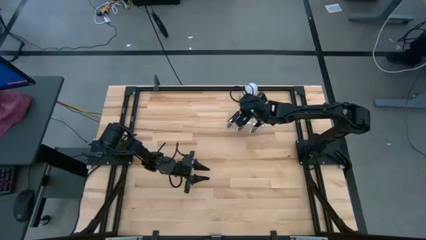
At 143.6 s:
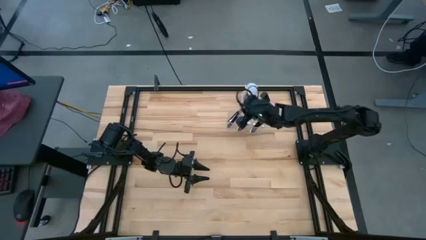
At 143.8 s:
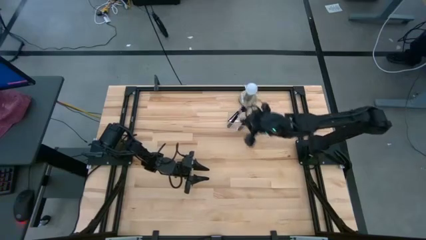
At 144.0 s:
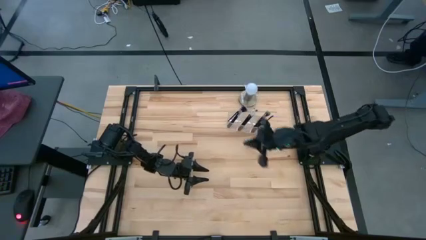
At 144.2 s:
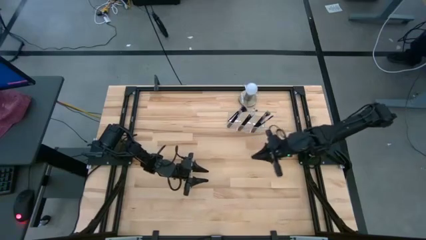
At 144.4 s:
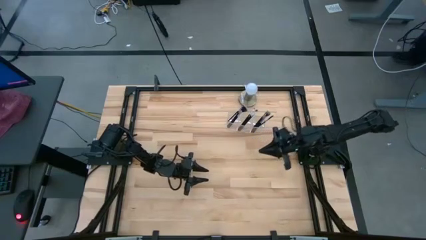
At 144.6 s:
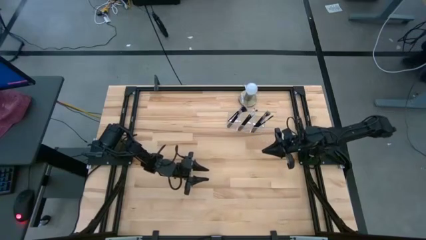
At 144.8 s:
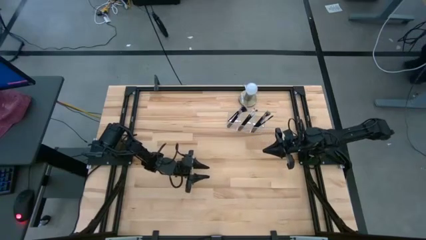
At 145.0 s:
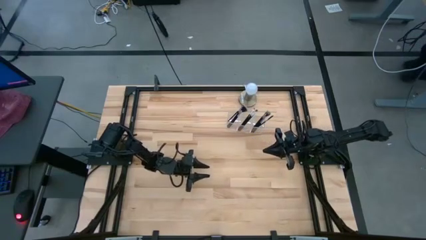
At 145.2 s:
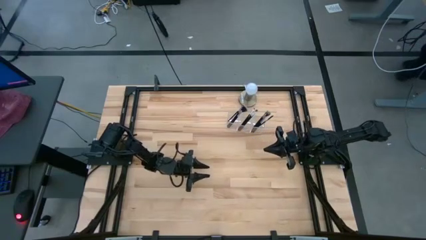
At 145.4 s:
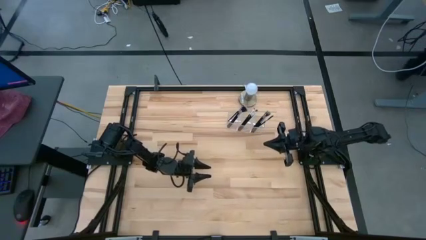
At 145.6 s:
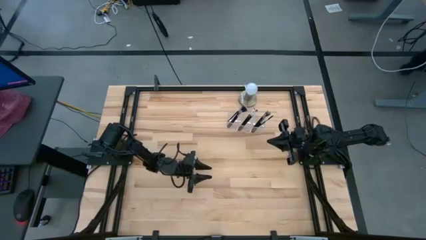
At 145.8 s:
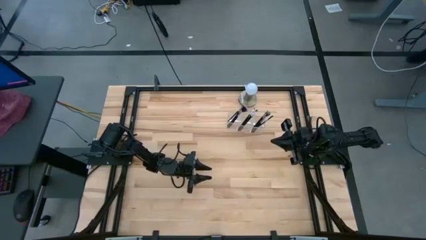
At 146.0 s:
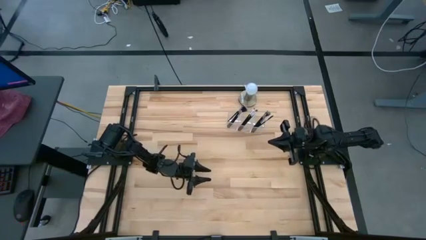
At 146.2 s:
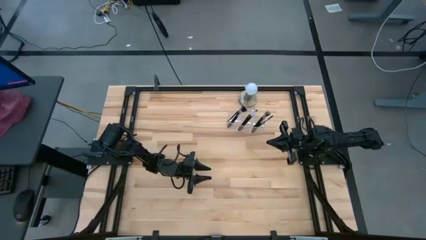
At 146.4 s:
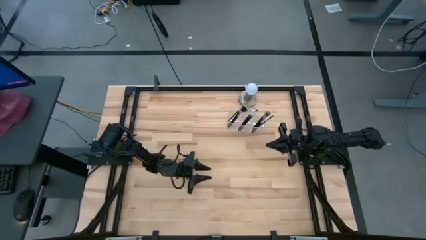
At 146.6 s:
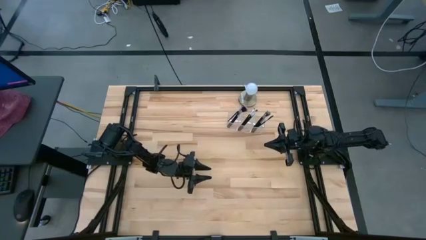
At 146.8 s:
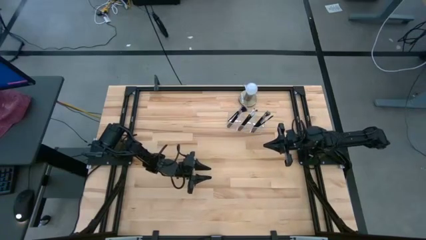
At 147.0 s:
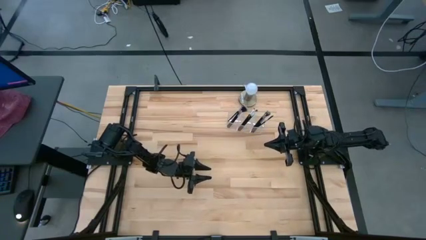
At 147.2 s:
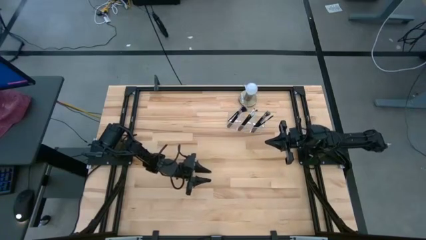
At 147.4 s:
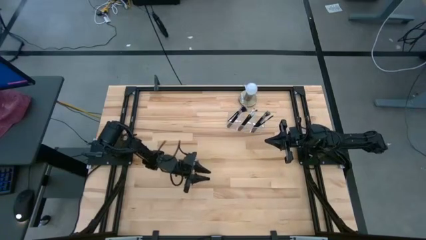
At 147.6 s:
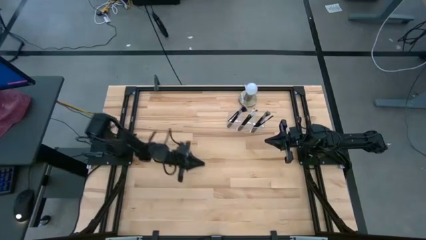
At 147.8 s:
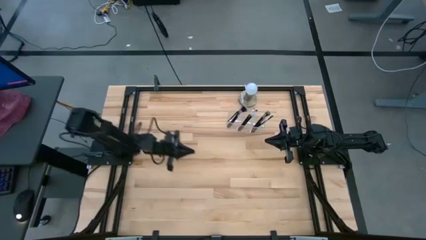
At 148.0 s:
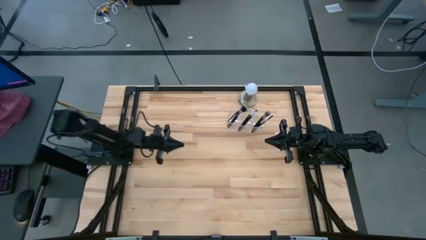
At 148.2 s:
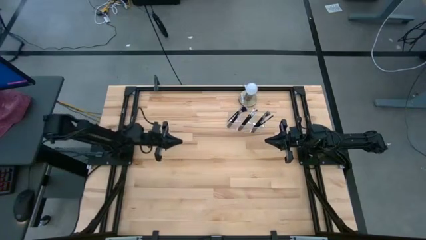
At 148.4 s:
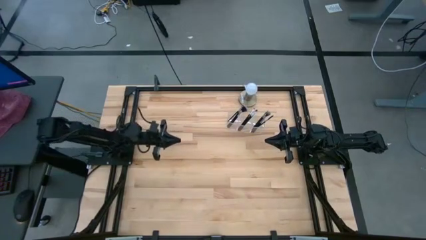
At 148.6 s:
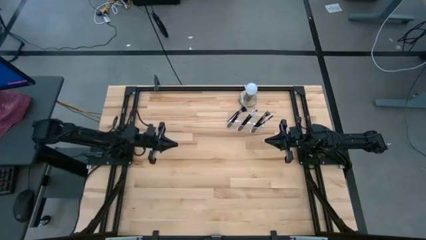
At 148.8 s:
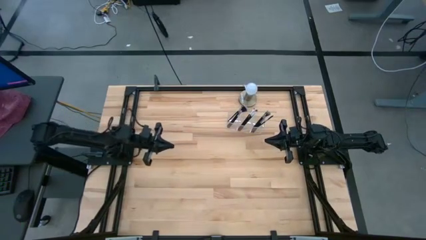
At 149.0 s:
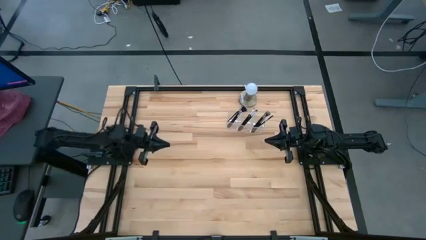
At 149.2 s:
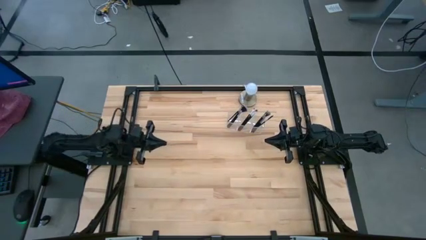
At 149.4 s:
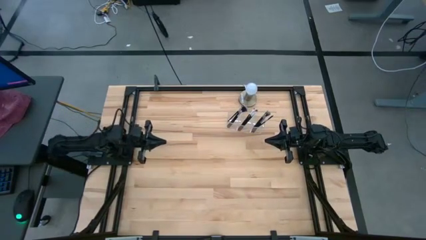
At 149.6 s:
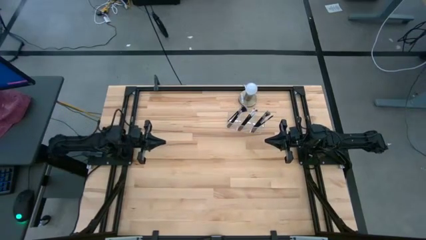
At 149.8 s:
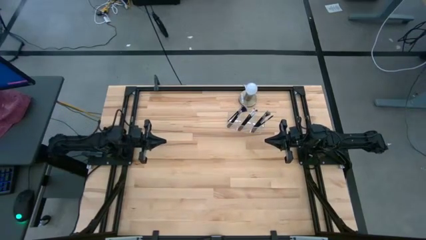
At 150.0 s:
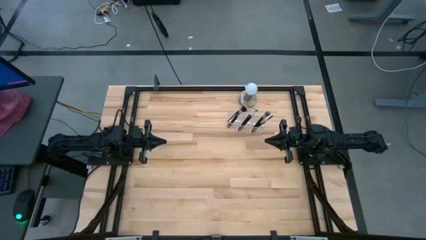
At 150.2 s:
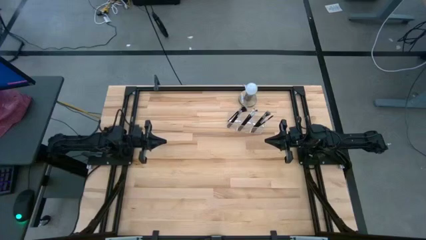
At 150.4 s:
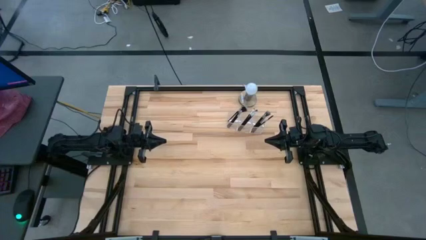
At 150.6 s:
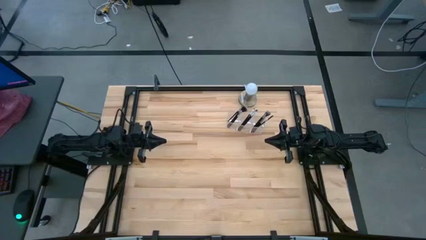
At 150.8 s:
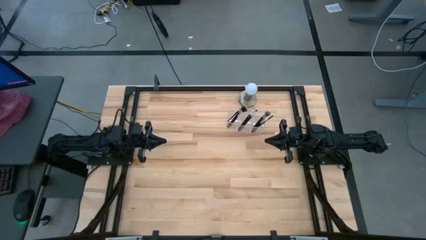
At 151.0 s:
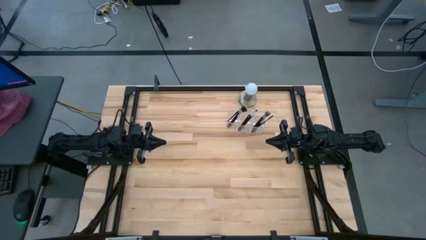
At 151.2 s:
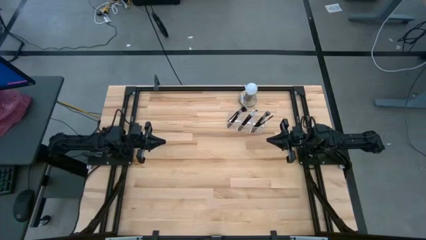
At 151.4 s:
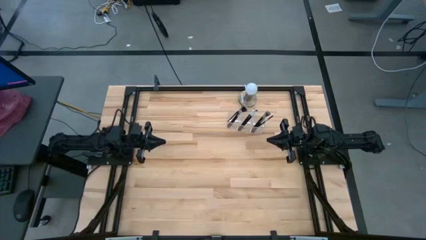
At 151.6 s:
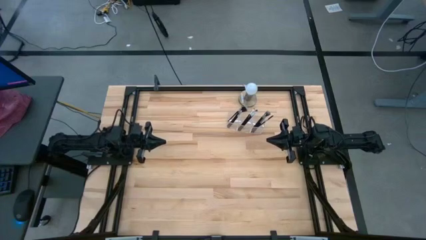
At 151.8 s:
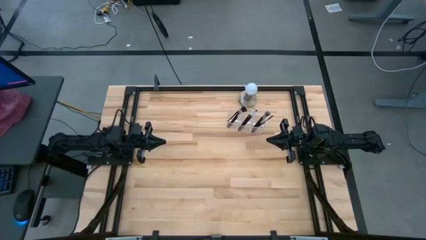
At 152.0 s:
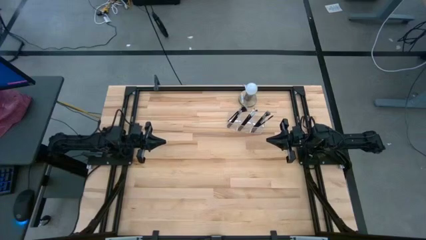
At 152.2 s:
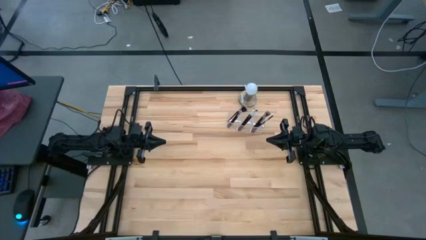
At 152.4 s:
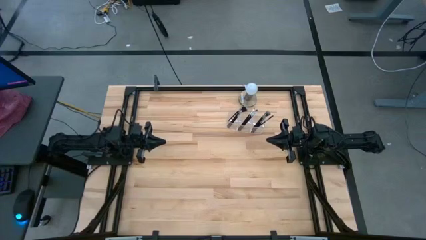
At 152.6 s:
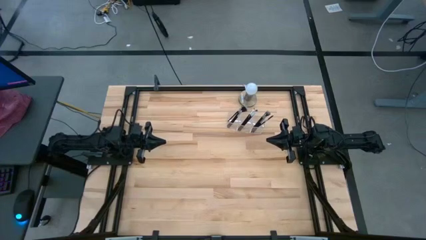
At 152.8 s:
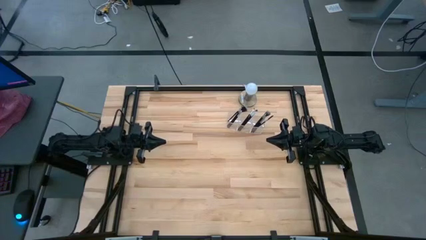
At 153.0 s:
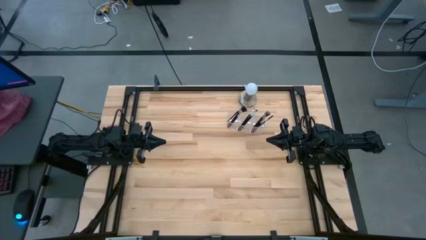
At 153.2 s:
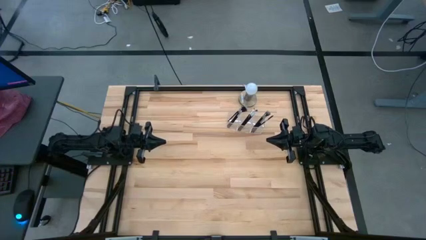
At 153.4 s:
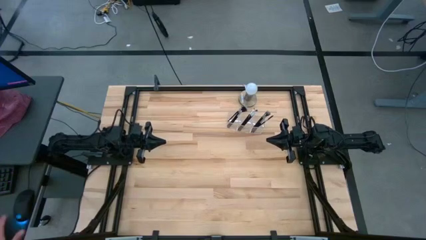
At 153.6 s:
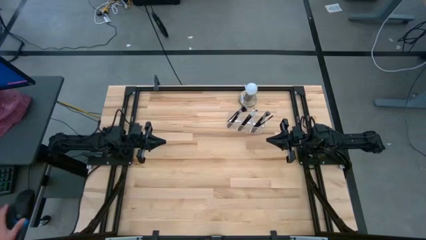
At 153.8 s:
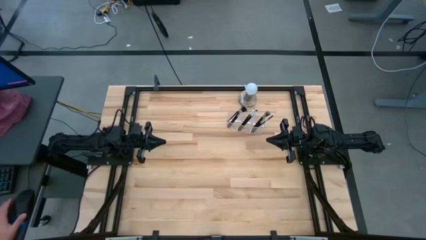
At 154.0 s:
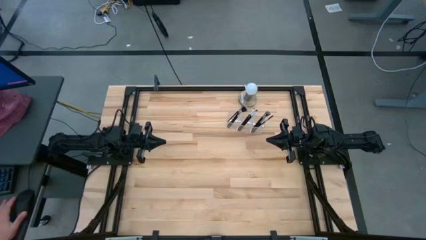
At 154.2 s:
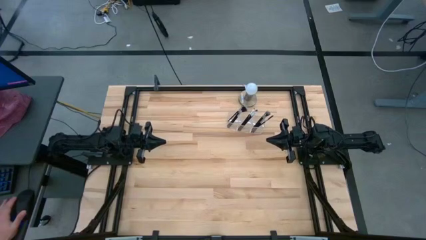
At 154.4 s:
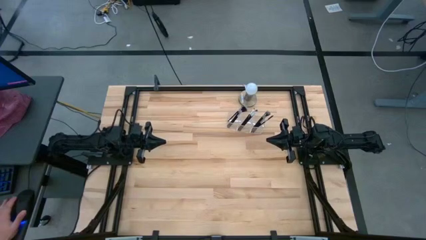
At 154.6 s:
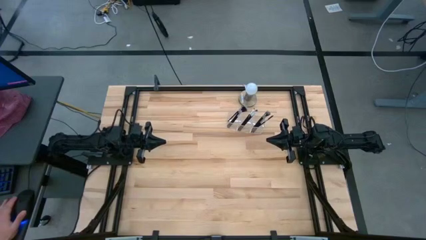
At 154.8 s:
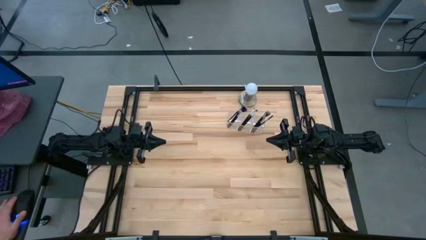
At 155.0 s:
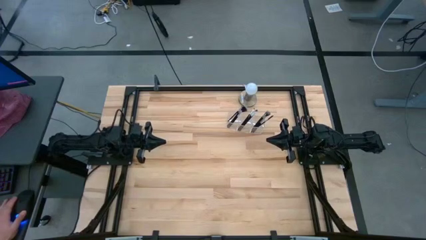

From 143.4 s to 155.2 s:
Task: Put items in baskets/containers
Return to Home Position

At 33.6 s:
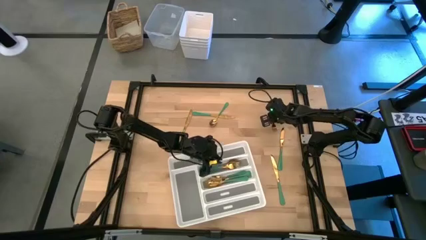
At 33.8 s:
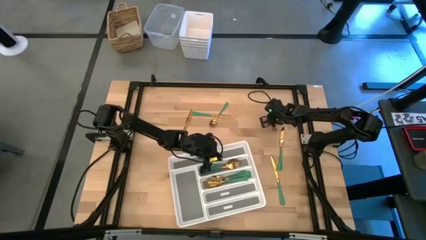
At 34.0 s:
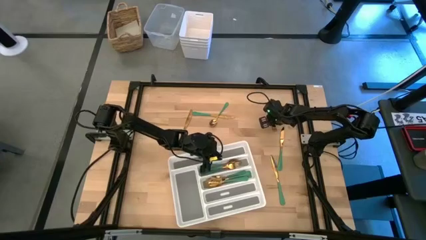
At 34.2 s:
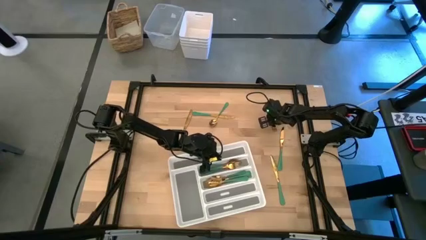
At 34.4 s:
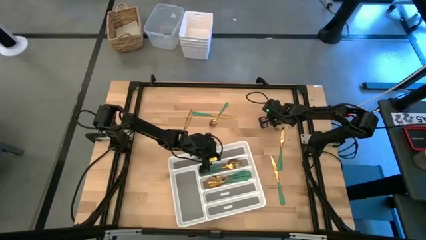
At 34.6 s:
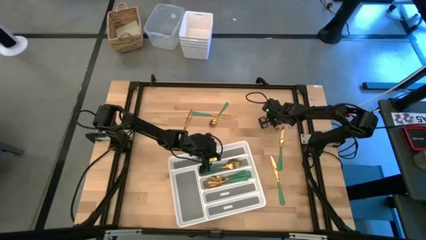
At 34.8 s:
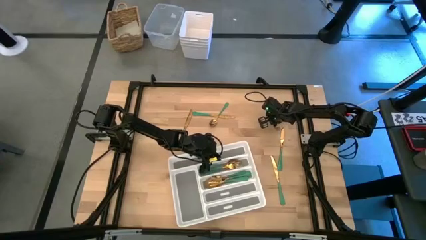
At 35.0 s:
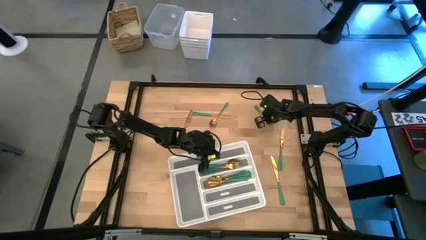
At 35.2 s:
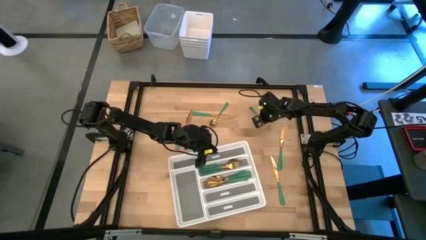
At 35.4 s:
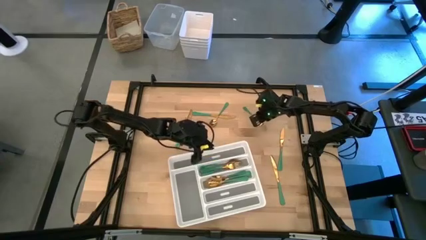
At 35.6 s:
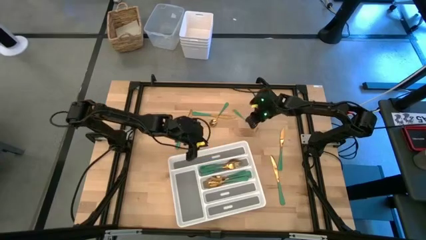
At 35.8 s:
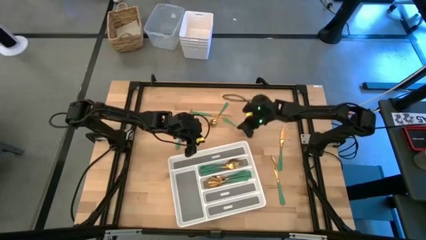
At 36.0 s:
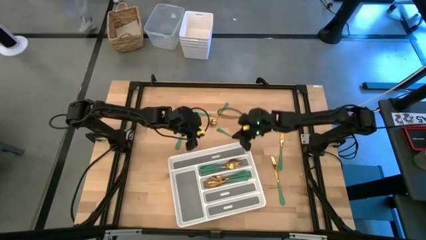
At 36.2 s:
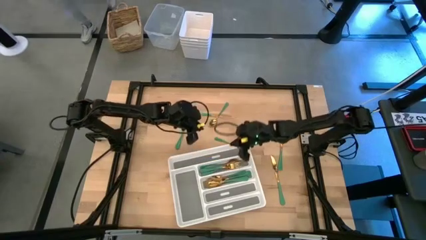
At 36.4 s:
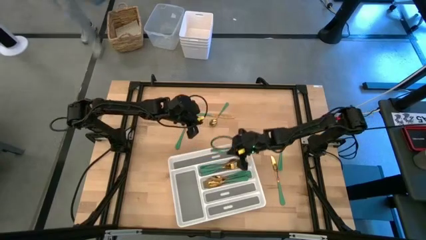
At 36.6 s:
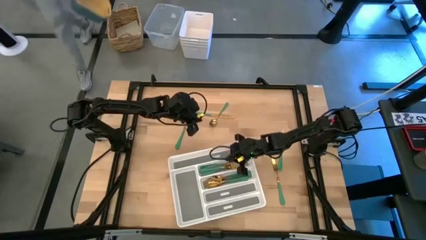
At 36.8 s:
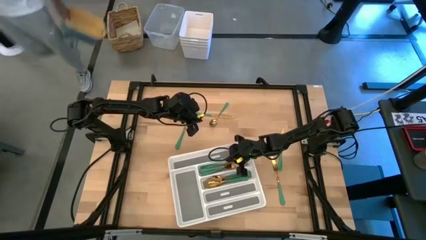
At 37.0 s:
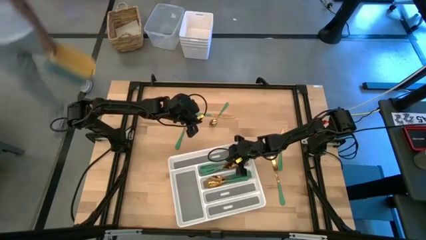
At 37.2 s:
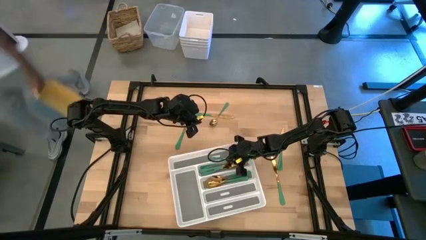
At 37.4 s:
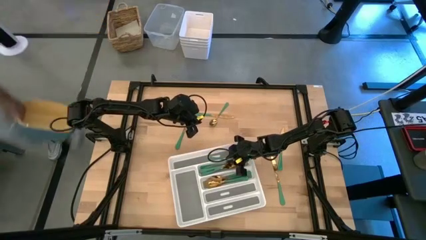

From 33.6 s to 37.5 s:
Task: Sort silverware
Put the green spoon into the white silverware tray
